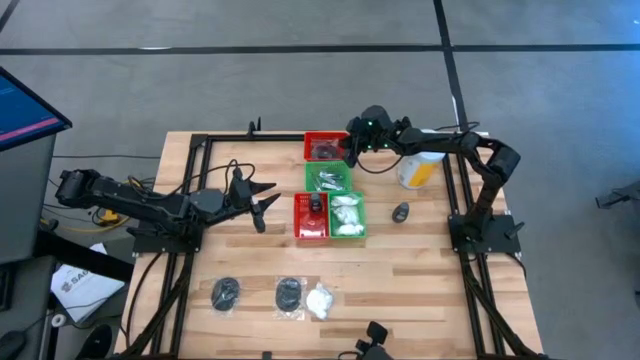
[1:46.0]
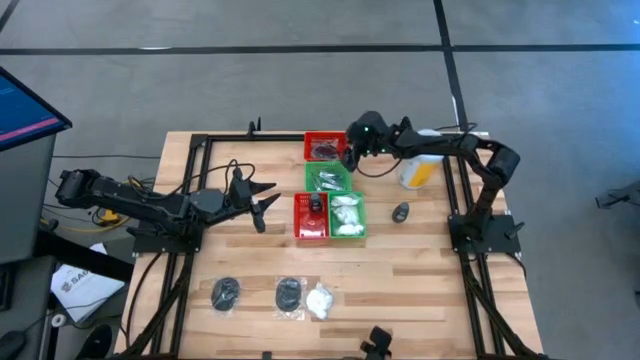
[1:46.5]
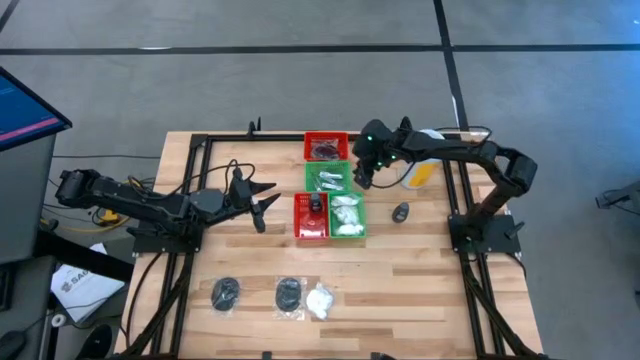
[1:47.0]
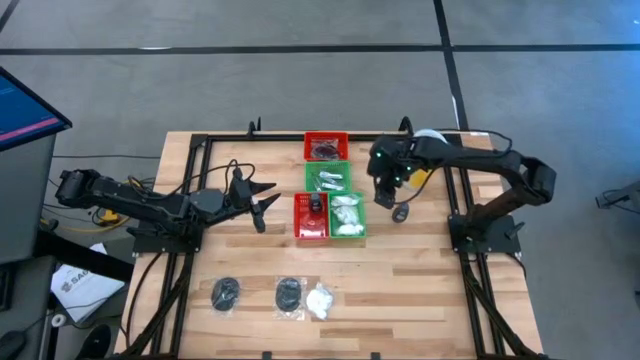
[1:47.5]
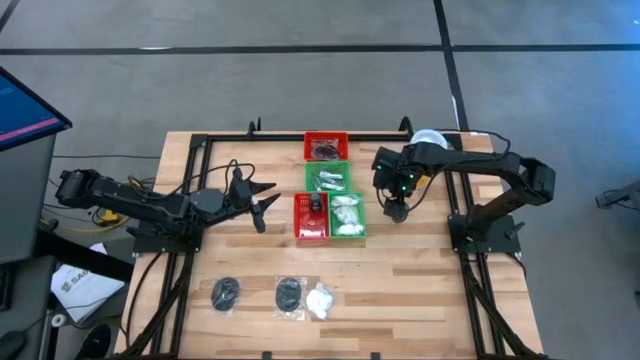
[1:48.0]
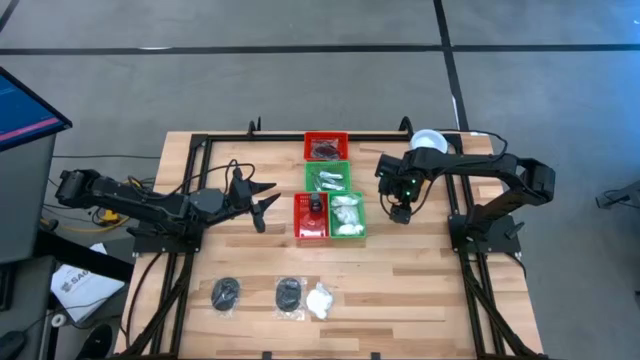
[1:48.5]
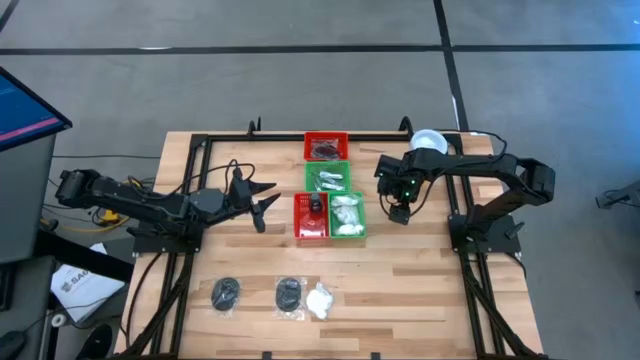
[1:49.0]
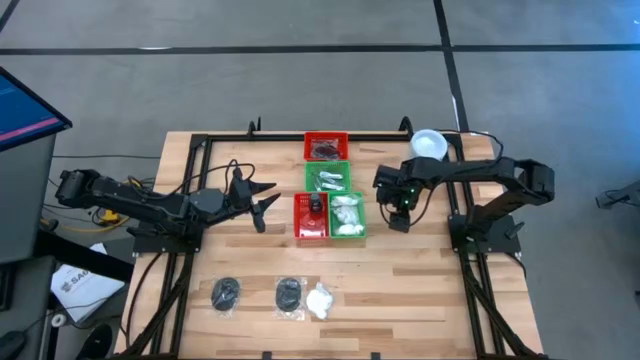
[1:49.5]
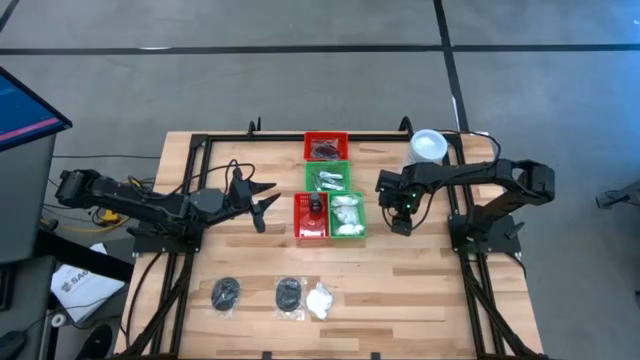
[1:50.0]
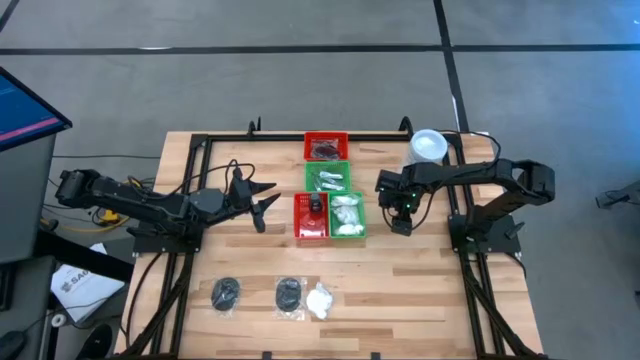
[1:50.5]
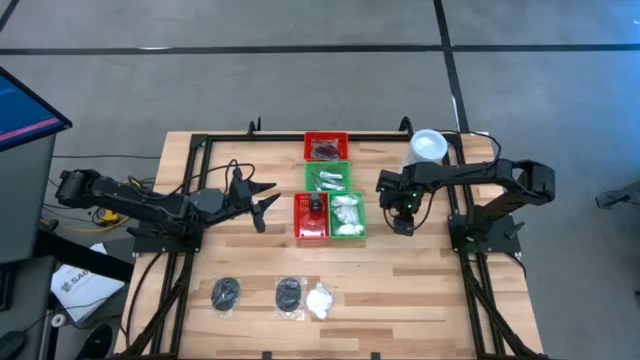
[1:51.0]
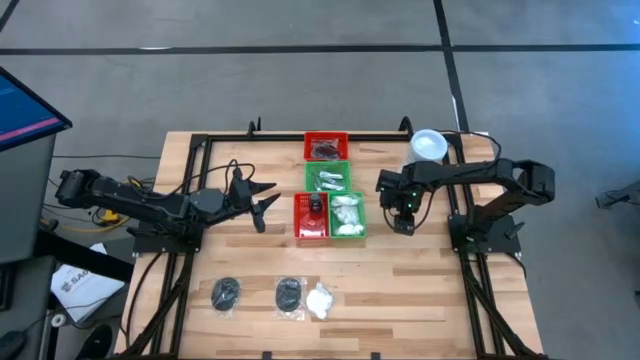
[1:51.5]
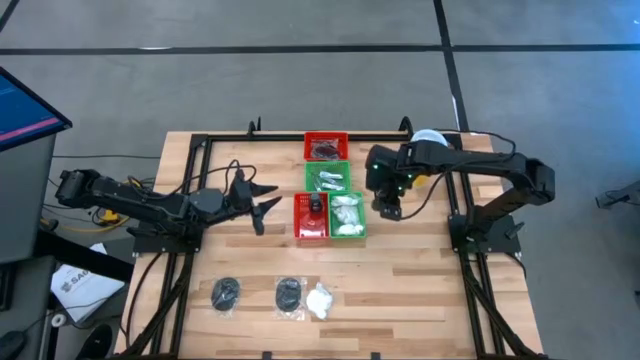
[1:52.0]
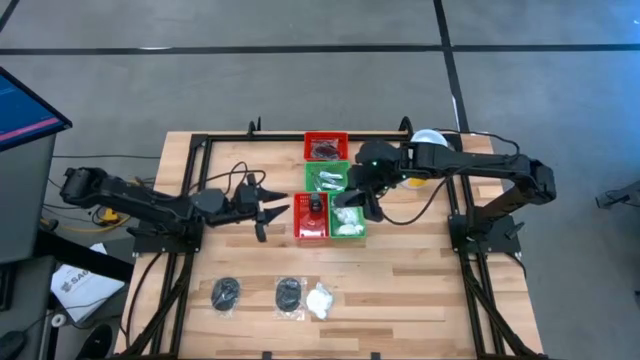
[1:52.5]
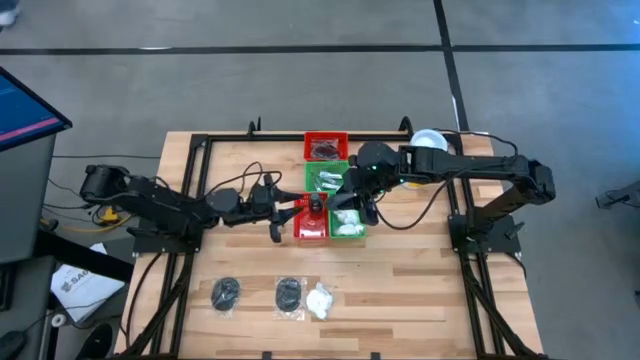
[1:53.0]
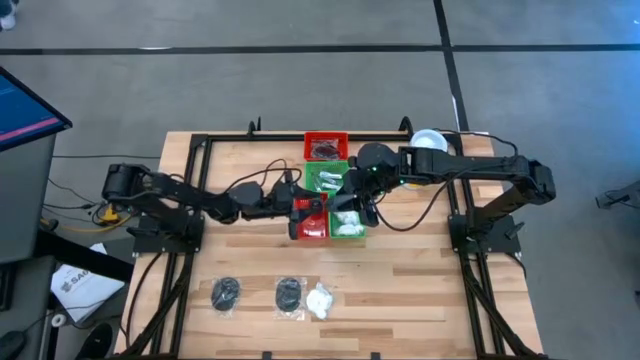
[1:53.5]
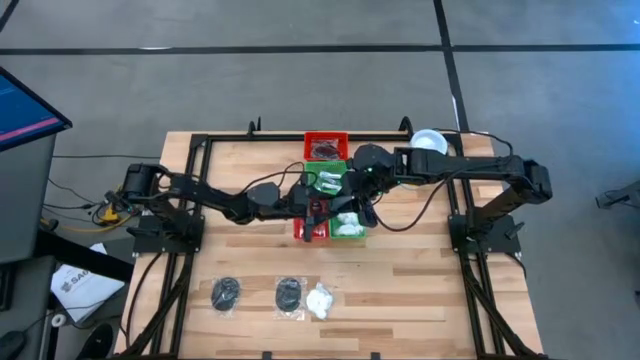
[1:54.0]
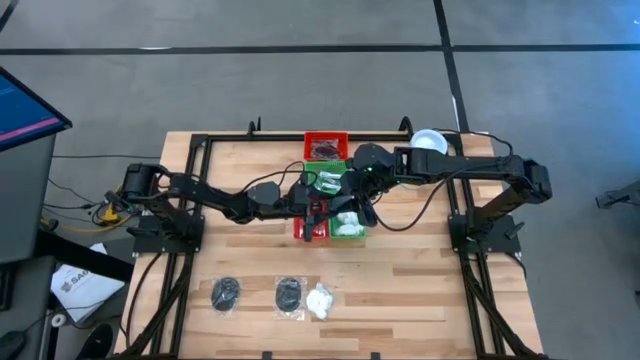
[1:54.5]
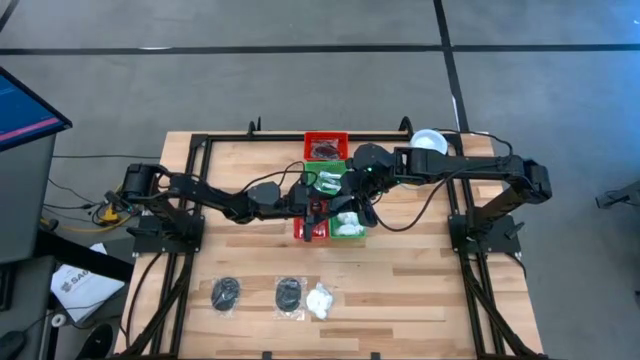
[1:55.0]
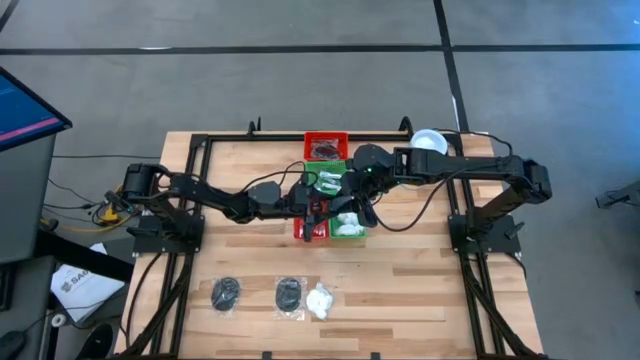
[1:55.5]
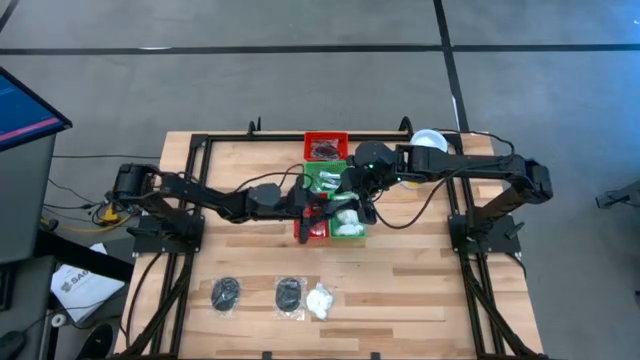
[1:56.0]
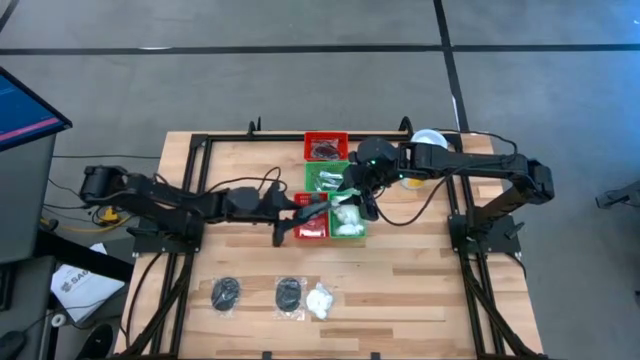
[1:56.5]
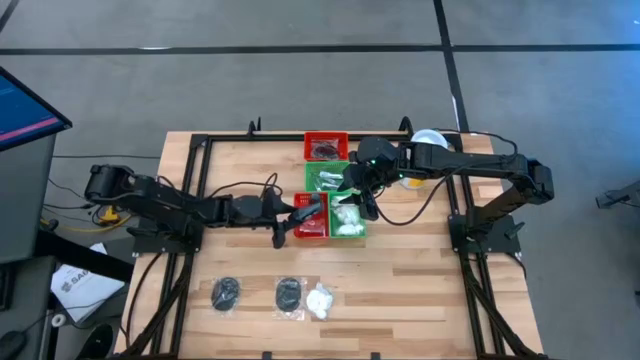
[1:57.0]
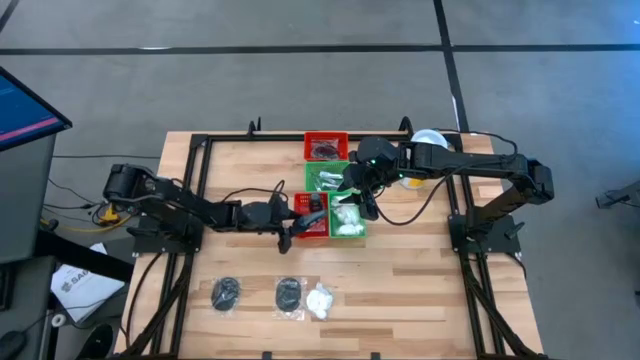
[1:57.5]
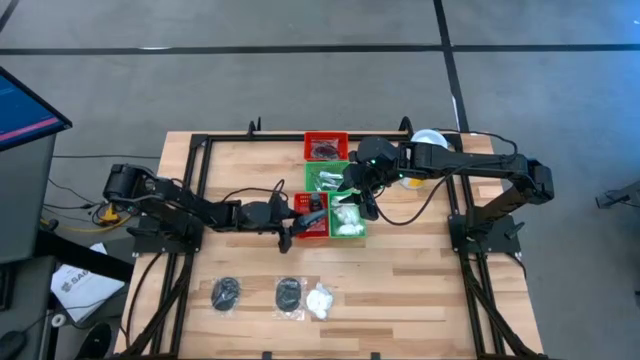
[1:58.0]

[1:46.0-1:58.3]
Task: Pick & Place Travel size toiletries
Put the gray deodorant into the bottom red bin

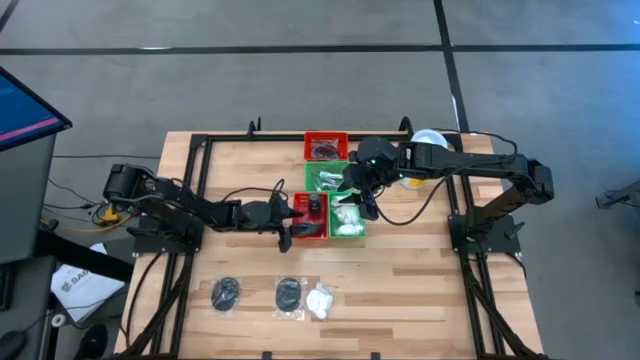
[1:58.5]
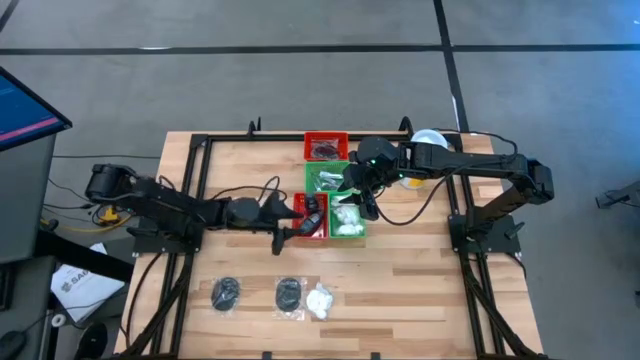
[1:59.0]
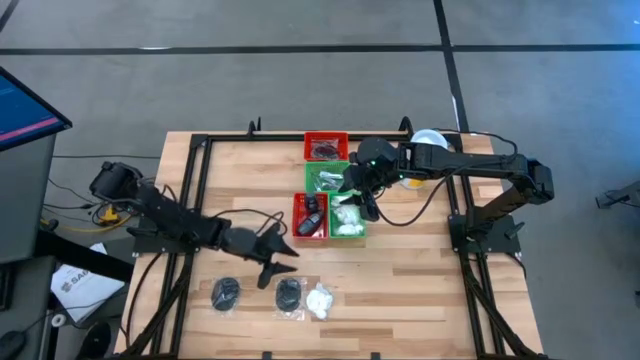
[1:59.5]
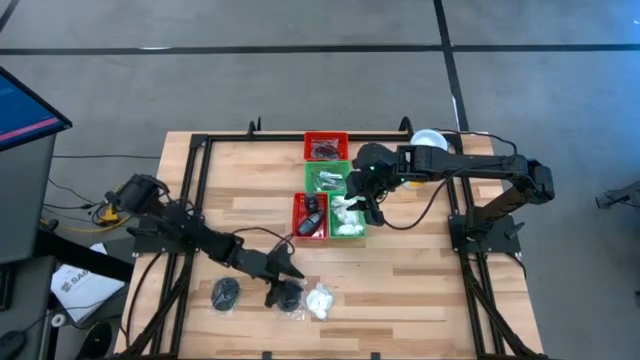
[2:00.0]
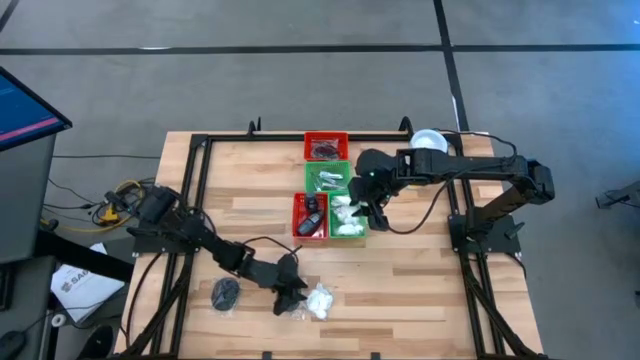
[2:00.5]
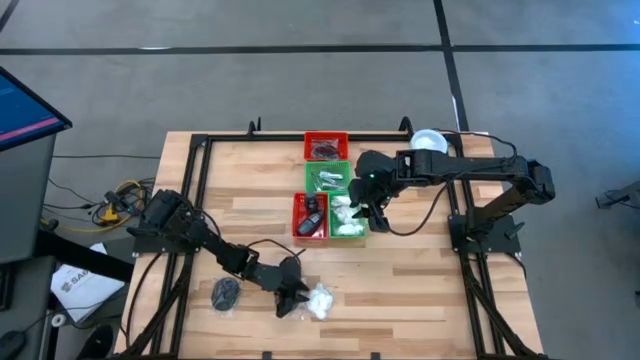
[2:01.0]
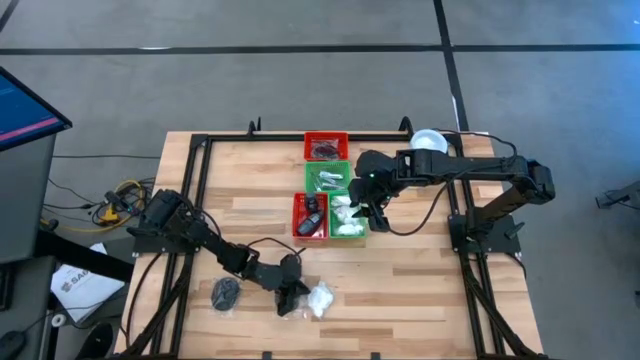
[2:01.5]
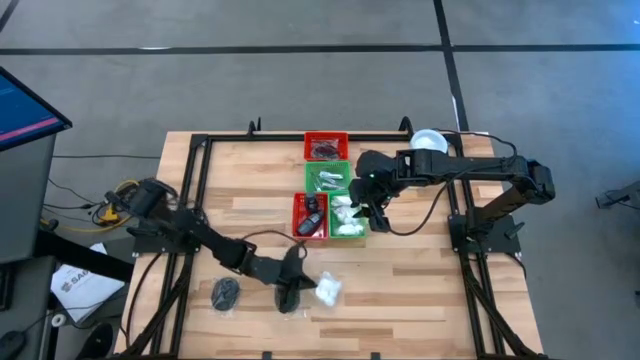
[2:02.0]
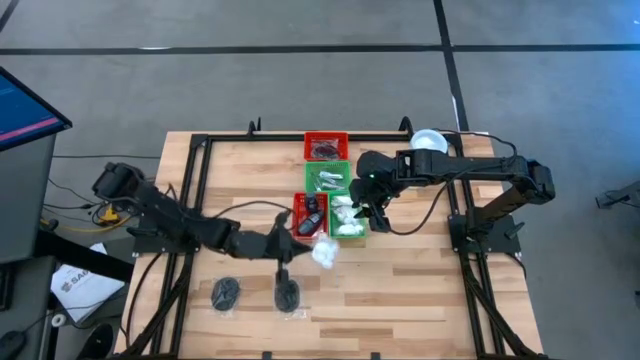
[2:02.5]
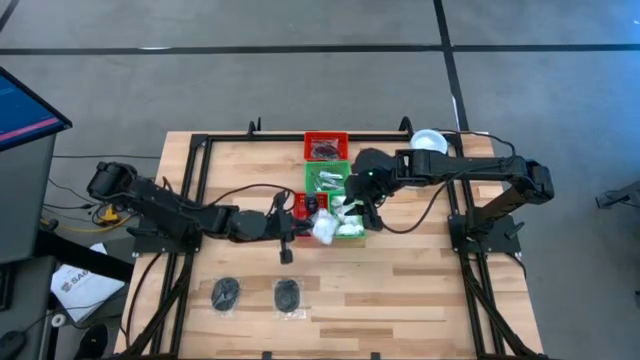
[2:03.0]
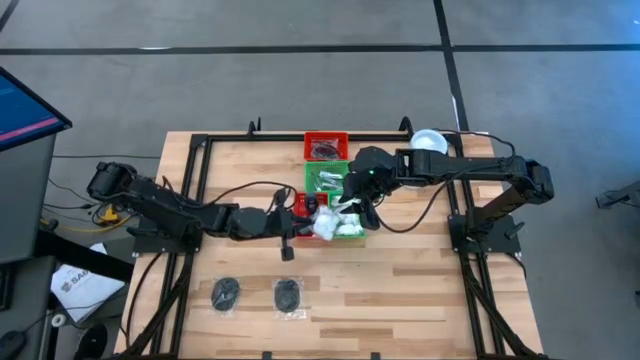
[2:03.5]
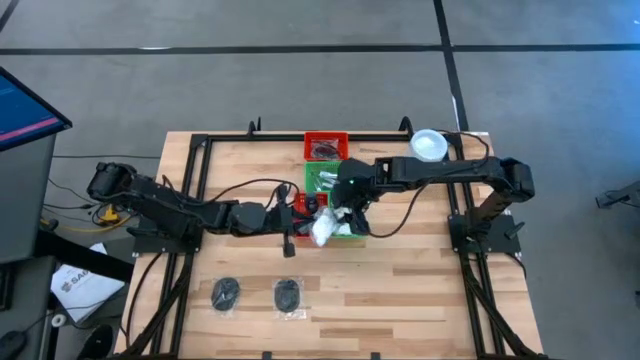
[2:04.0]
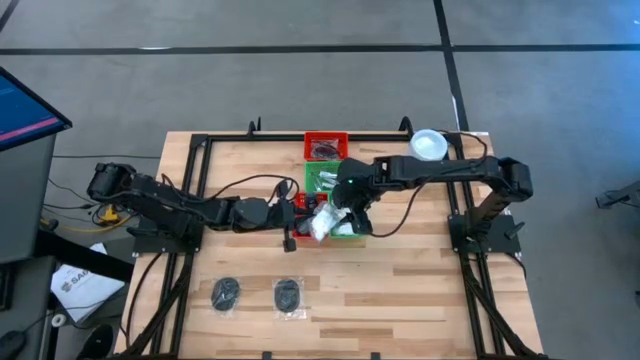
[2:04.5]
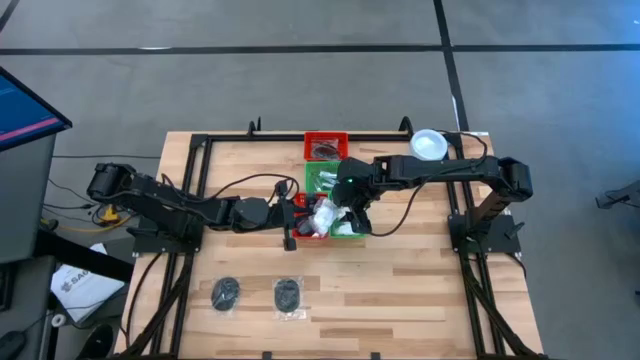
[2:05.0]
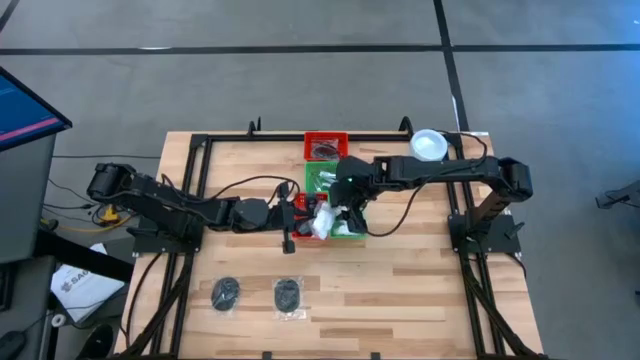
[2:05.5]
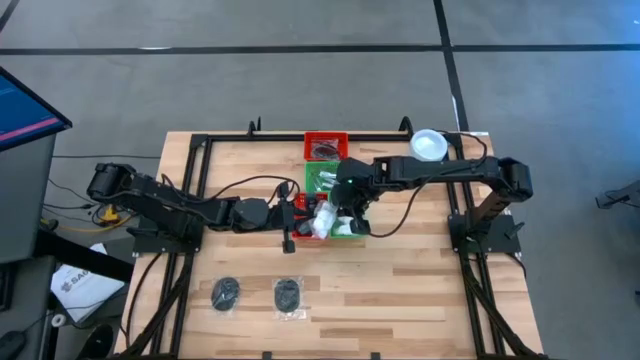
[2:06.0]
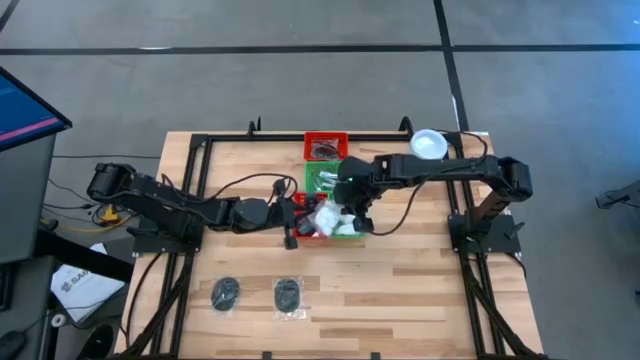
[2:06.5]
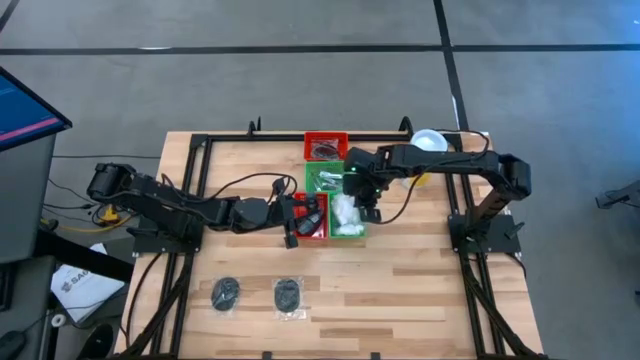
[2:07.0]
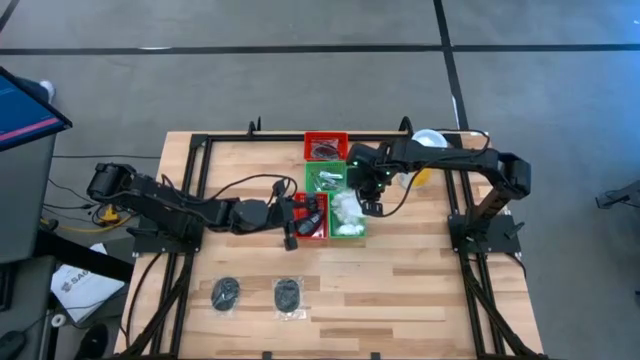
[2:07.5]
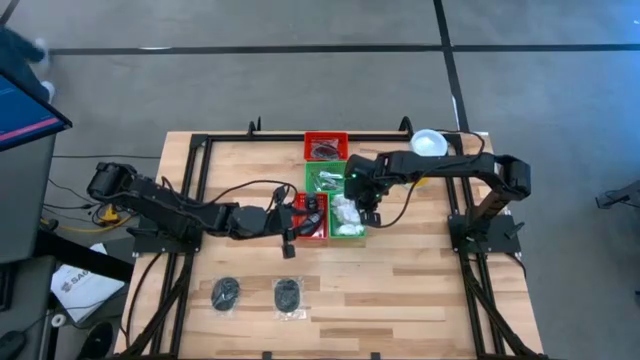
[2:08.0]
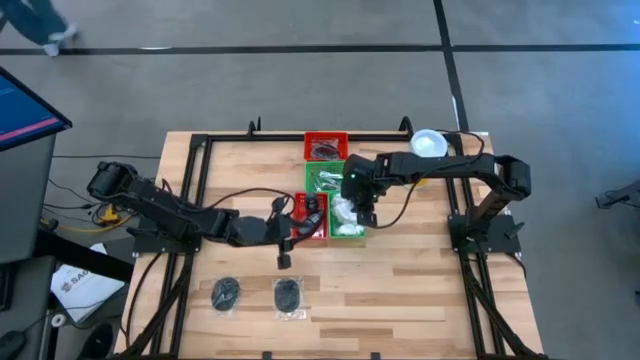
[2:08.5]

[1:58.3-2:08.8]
Put the white cotton pack into the bottom green bin
